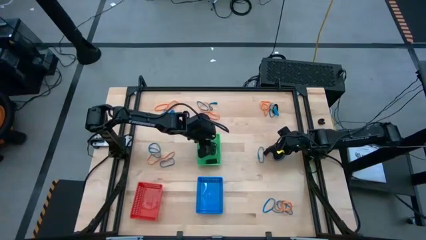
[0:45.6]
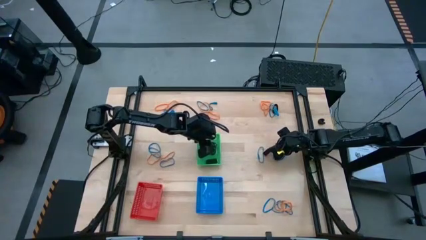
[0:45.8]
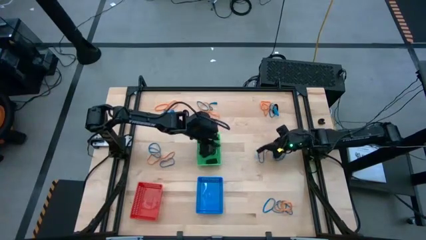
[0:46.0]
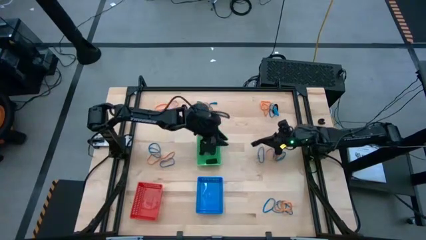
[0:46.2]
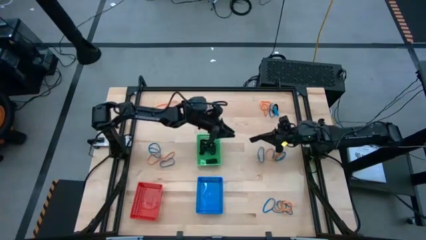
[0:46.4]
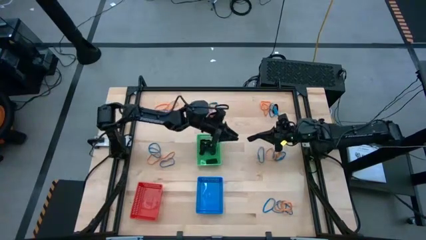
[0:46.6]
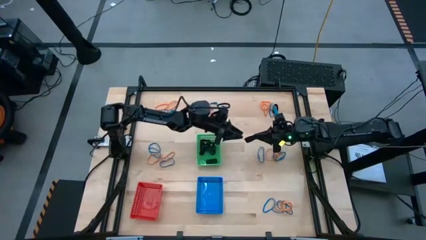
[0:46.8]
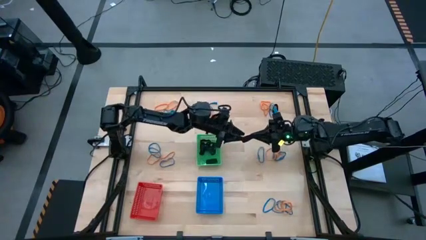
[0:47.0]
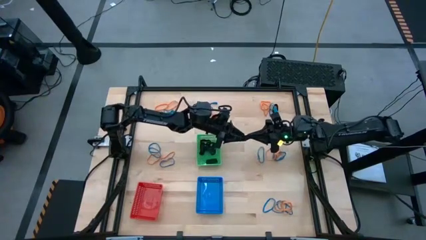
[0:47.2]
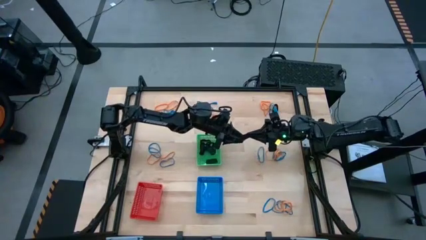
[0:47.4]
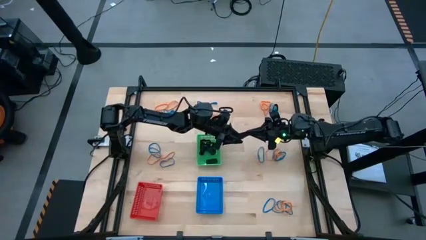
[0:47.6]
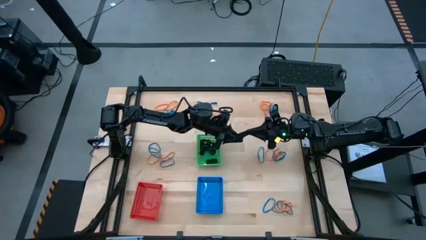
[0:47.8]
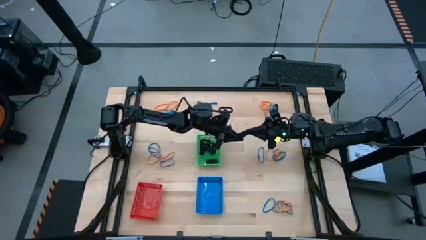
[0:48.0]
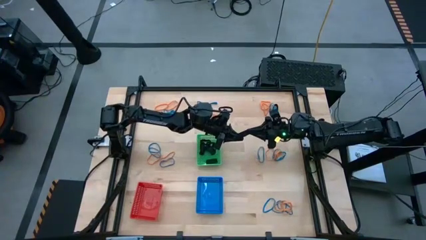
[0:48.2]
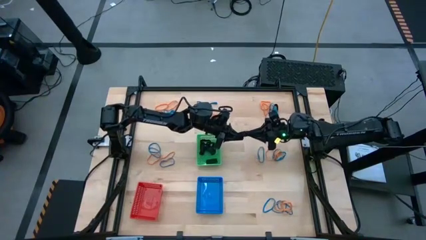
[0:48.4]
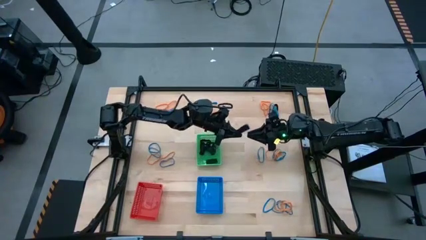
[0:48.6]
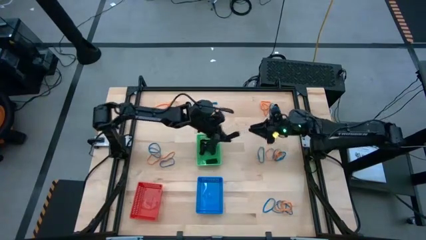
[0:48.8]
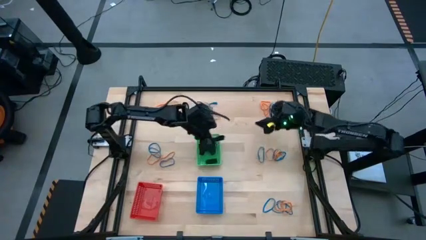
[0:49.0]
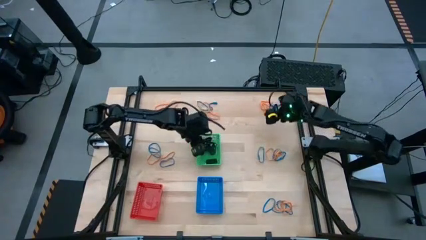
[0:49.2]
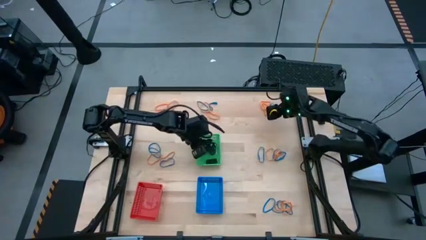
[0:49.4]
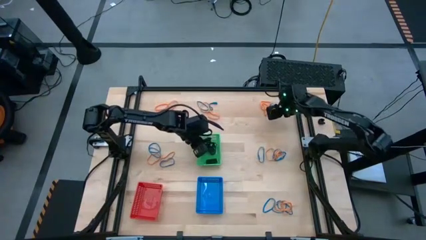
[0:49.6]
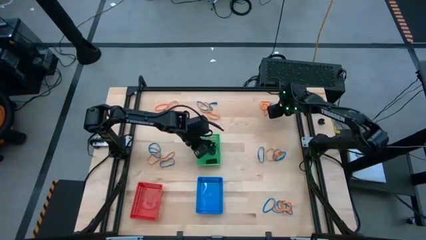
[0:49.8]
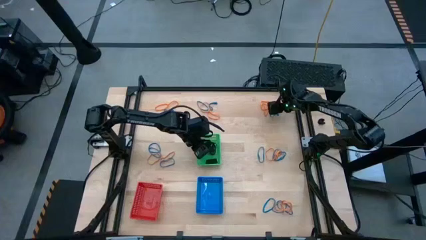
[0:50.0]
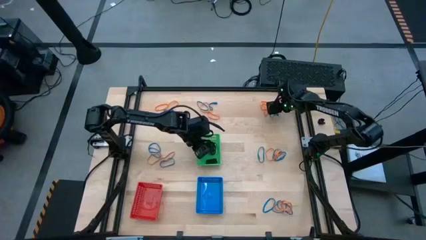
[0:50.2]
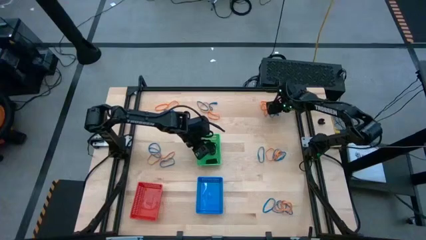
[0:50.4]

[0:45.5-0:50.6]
Task: Sort rubber bands into baskets
Put the black rubberband into the green bin

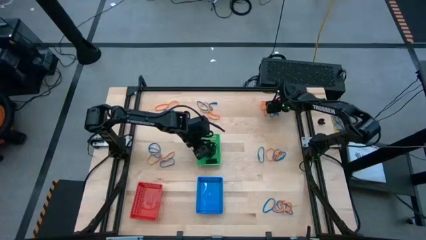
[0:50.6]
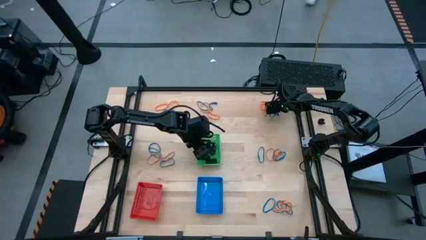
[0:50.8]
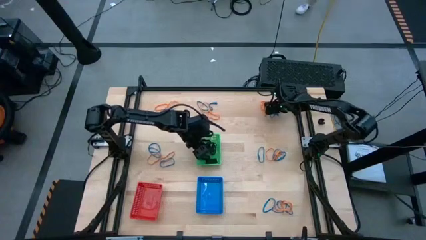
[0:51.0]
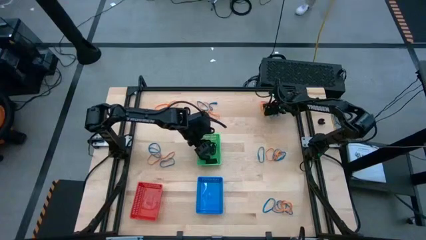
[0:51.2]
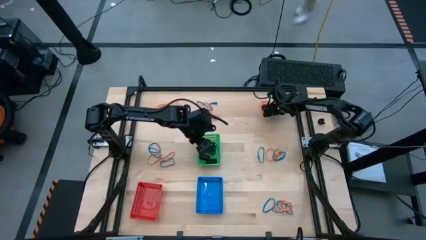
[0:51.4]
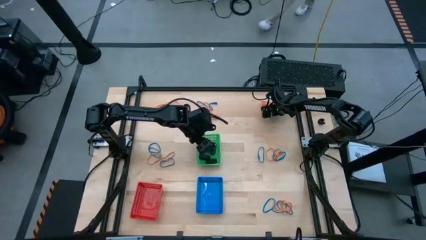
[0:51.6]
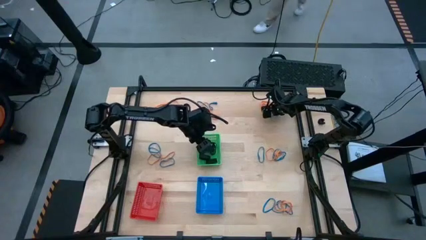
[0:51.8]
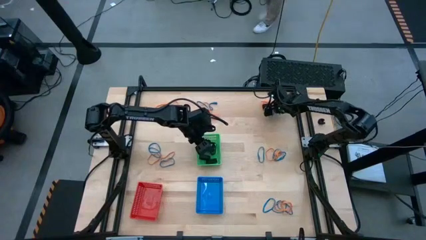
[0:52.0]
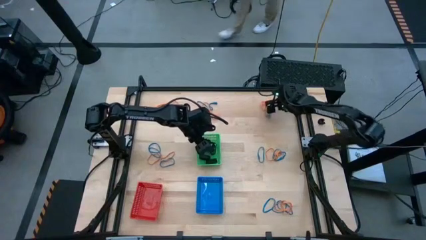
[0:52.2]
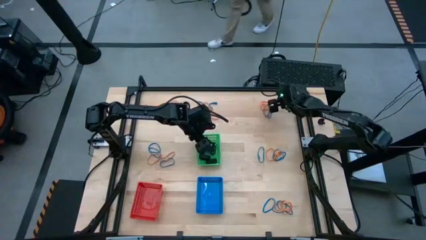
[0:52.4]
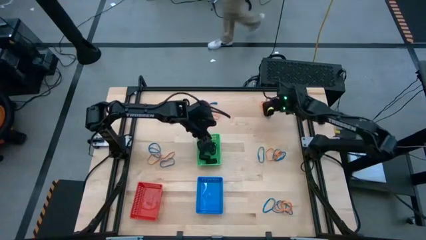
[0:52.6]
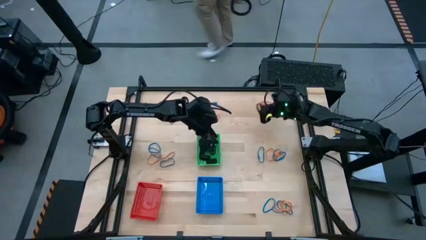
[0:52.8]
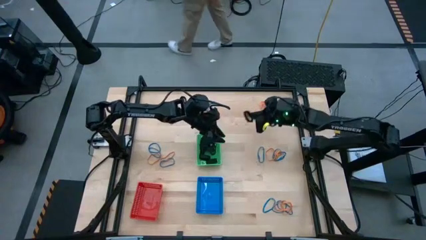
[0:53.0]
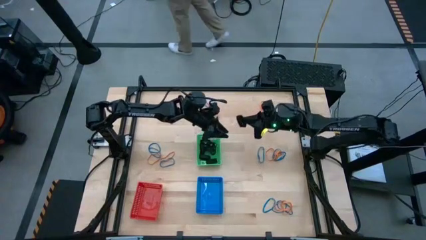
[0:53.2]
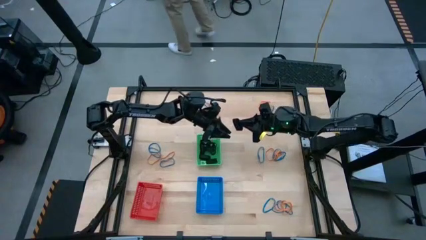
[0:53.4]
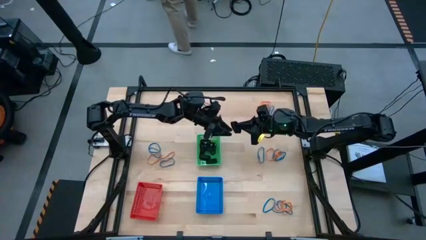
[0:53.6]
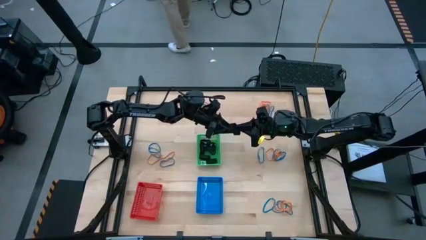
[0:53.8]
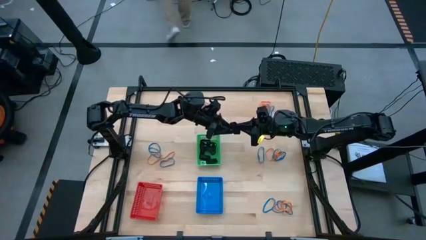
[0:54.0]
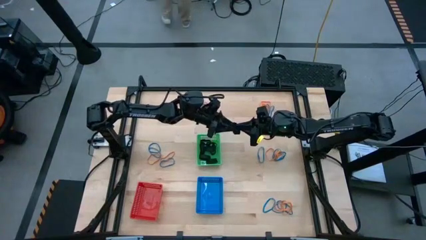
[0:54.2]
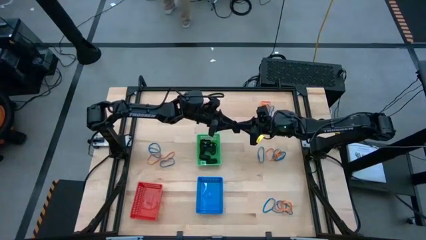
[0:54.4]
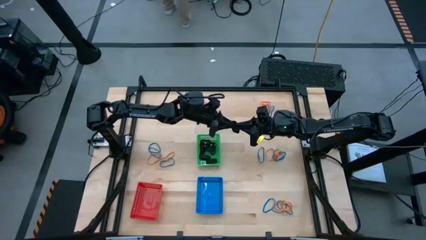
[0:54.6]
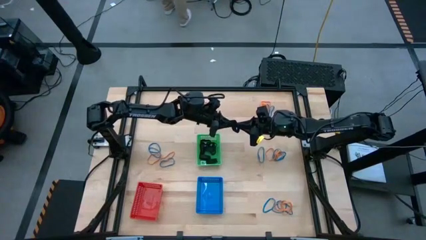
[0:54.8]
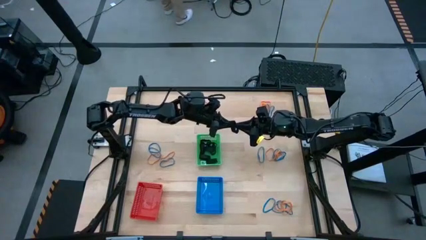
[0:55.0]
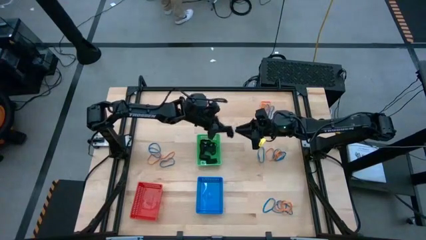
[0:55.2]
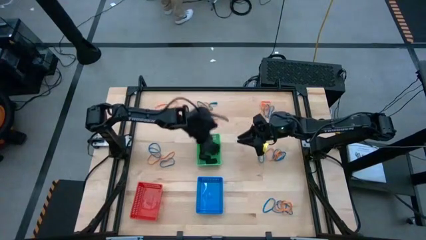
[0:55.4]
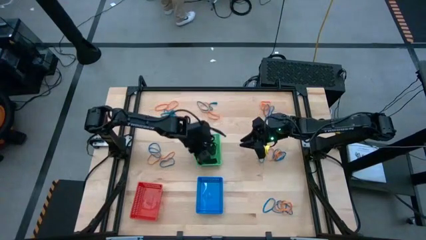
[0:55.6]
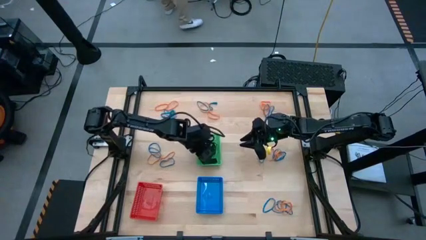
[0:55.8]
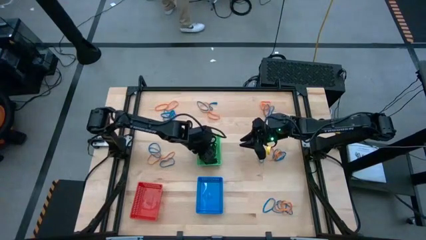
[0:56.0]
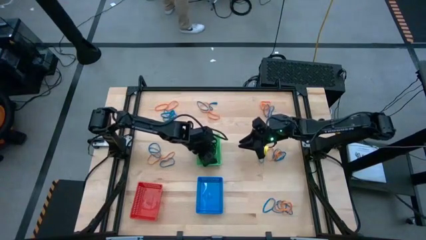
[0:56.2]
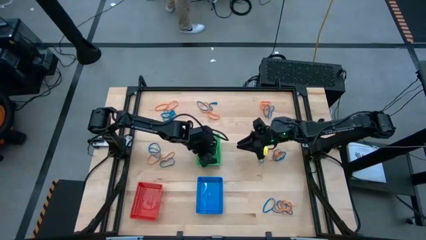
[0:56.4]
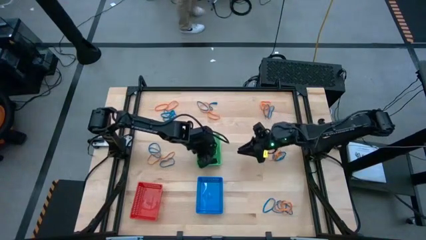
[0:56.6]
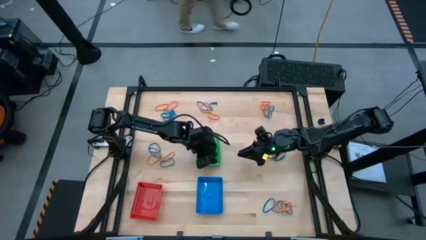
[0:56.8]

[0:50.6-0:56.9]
Put the black rubberband into the green bin

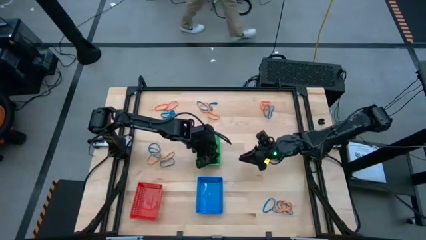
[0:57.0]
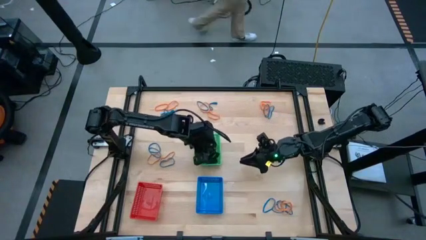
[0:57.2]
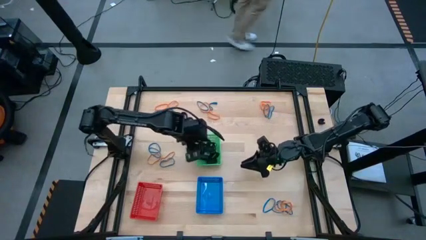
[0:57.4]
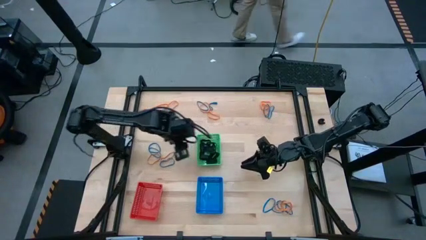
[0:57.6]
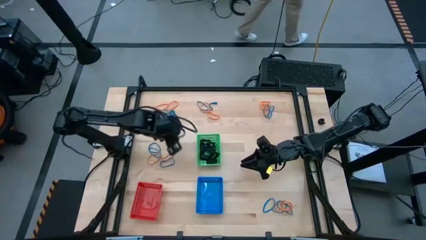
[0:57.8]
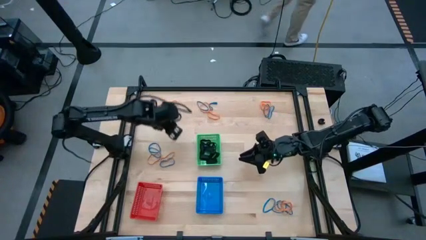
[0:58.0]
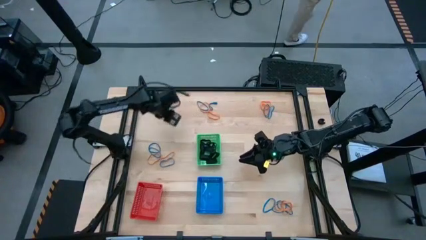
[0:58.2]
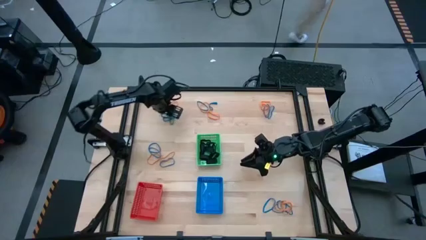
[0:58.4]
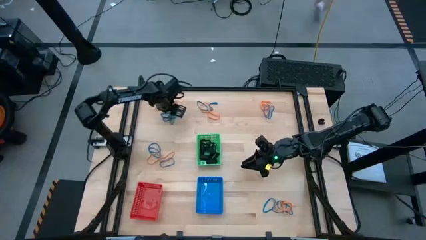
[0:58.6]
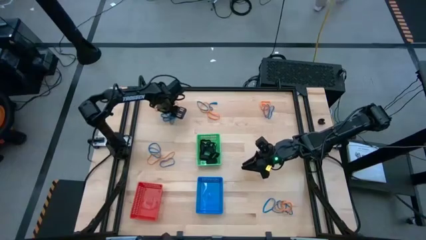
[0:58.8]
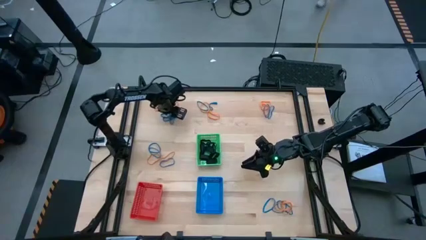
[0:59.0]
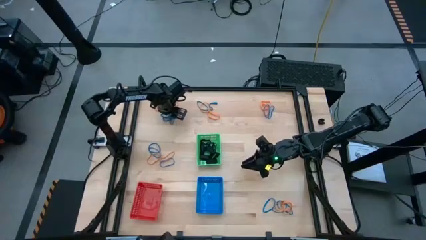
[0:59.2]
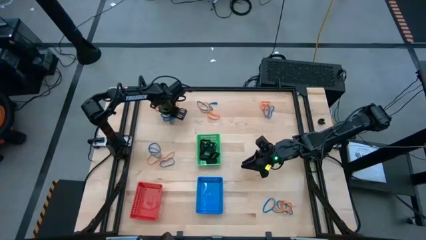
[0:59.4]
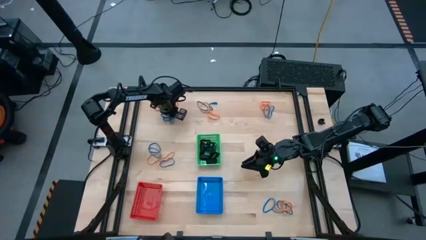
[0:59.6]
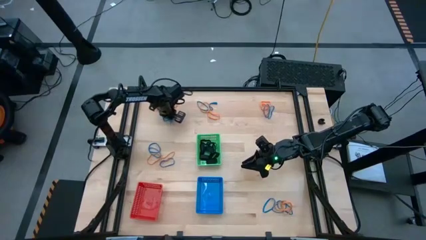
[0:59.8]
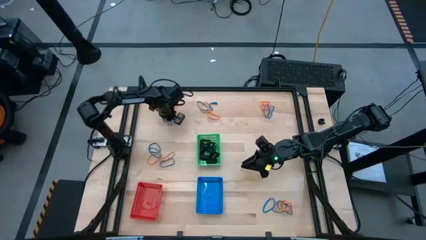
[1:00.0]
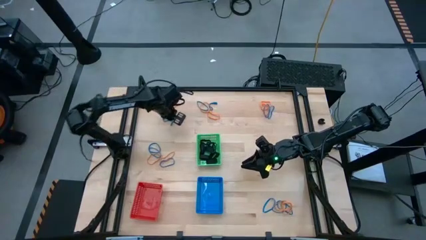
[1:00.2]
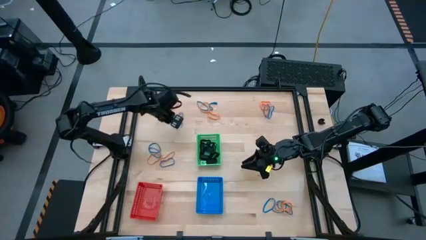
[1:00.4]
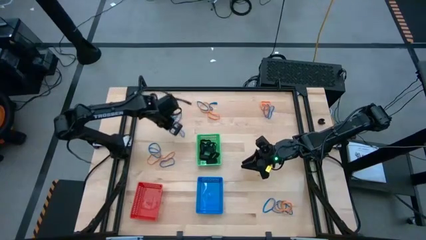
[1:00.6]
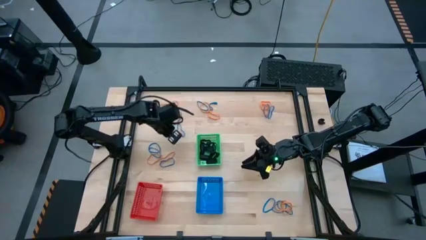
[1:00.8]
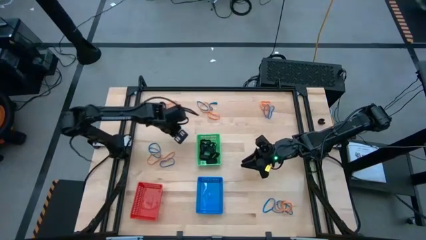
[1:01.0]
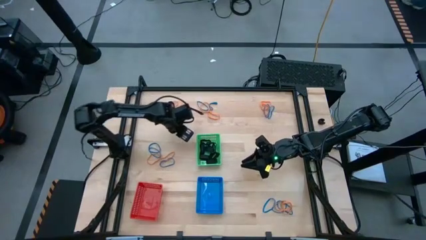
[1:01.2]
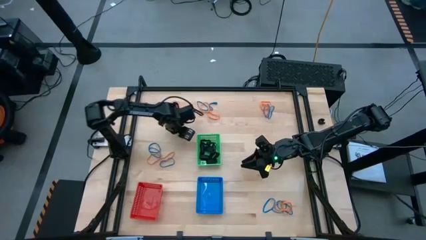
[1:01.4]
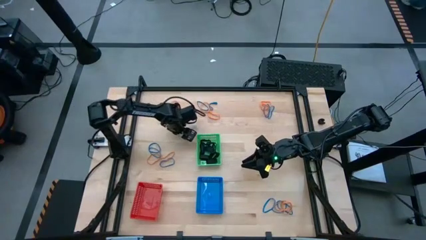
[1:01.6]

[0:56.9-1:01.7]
Put the blue rubberband into the red bin
